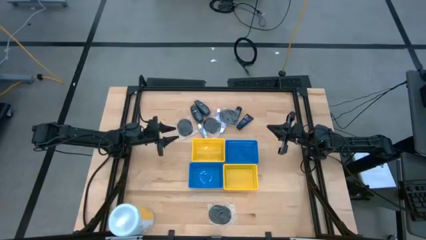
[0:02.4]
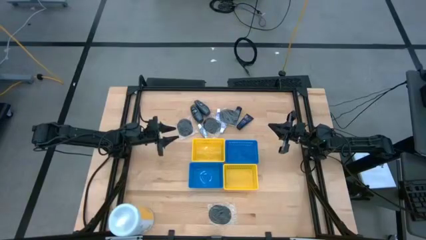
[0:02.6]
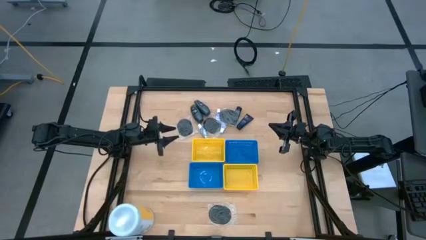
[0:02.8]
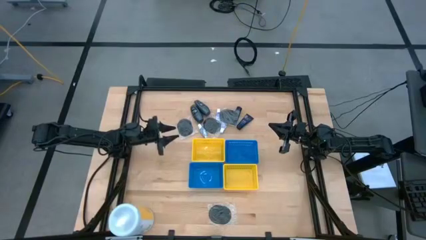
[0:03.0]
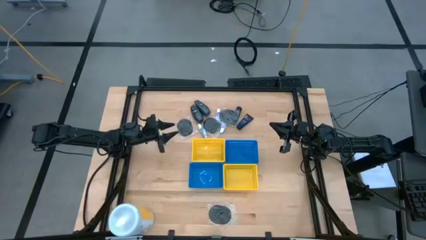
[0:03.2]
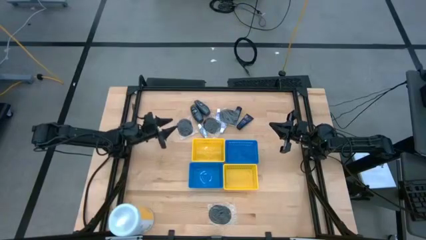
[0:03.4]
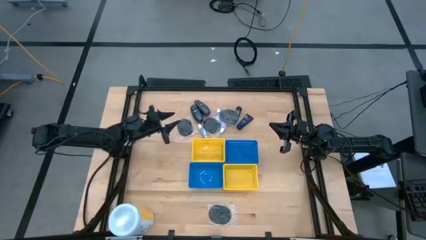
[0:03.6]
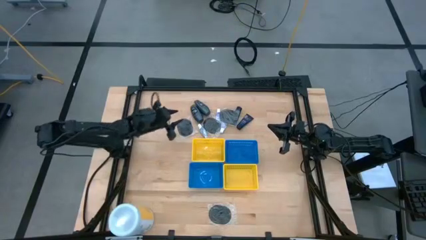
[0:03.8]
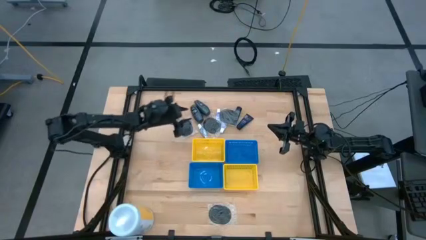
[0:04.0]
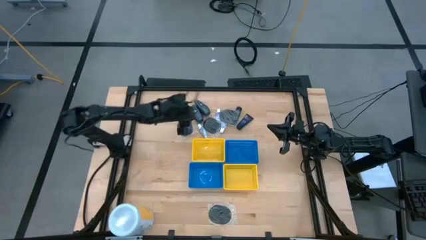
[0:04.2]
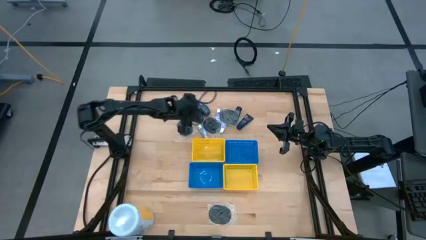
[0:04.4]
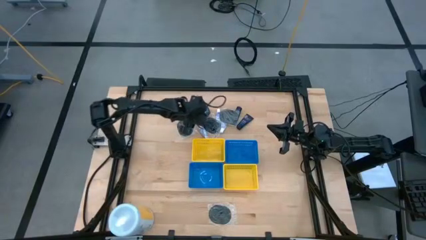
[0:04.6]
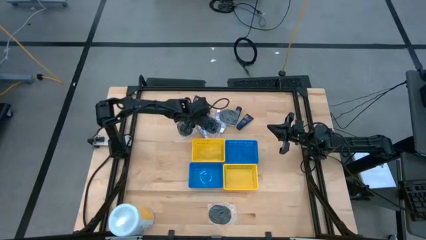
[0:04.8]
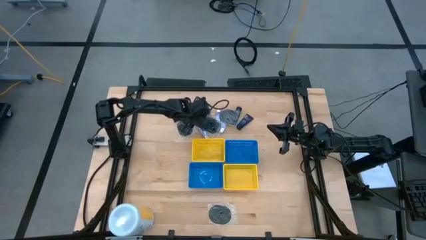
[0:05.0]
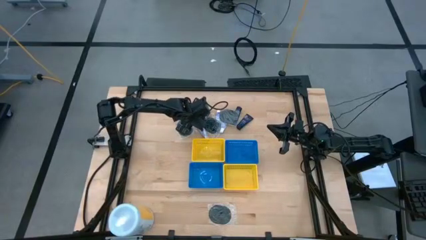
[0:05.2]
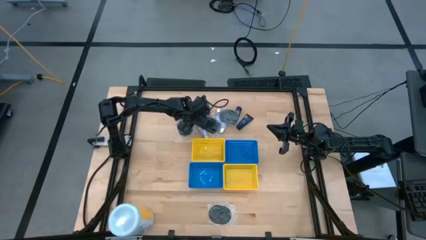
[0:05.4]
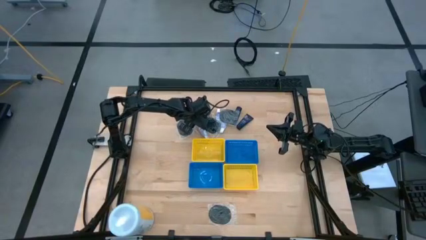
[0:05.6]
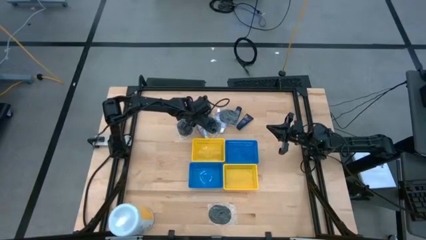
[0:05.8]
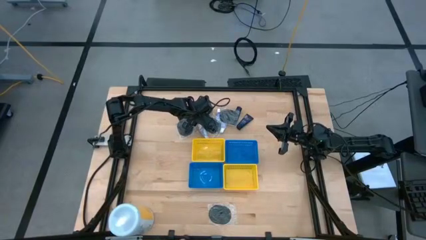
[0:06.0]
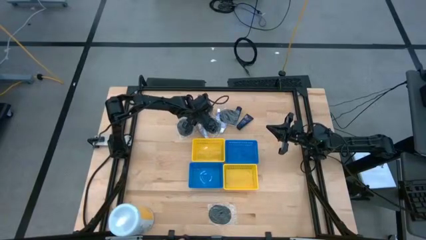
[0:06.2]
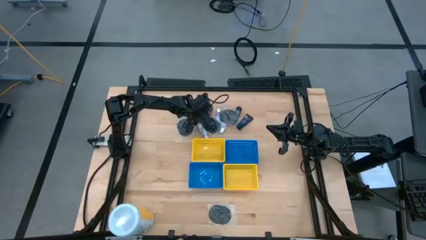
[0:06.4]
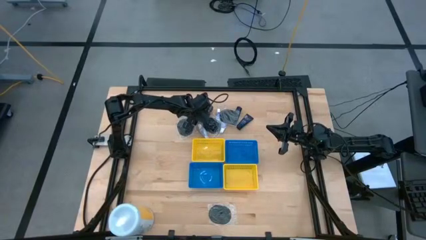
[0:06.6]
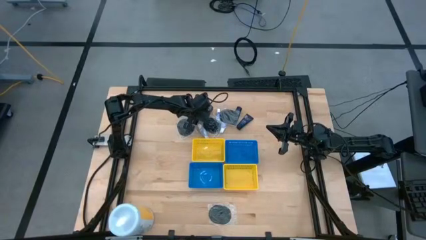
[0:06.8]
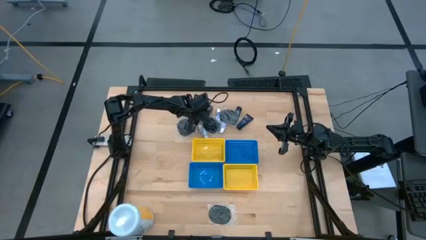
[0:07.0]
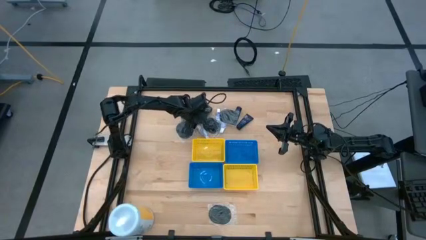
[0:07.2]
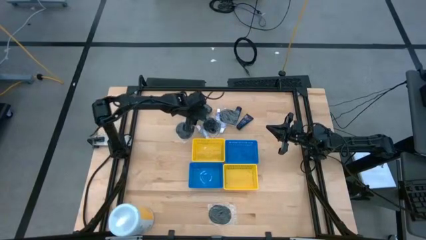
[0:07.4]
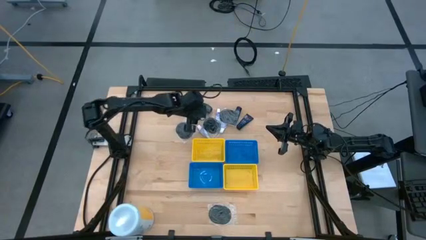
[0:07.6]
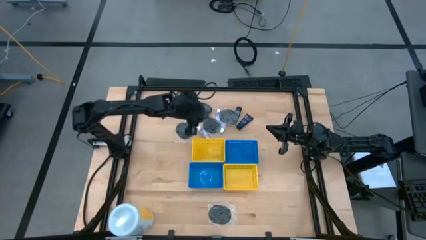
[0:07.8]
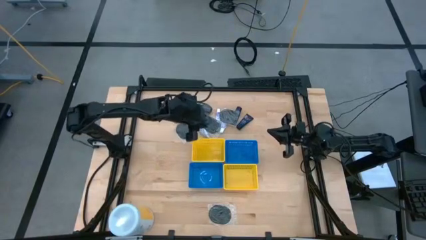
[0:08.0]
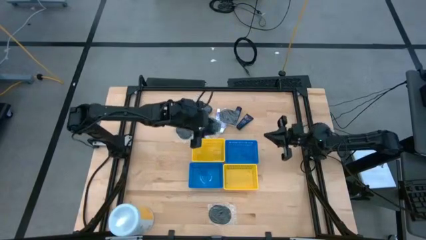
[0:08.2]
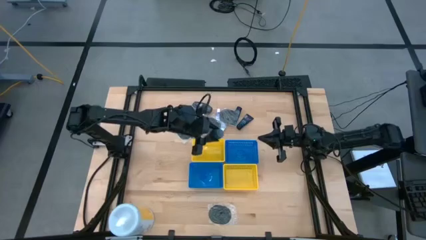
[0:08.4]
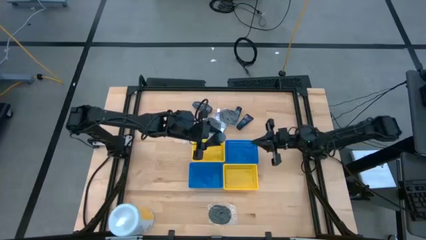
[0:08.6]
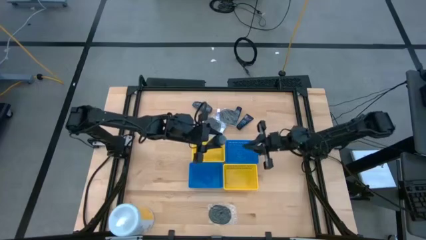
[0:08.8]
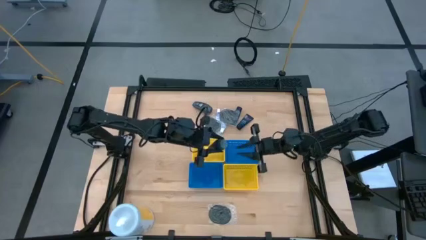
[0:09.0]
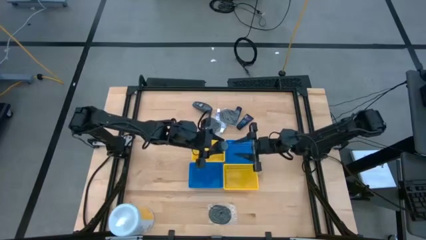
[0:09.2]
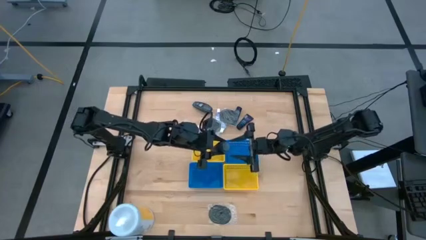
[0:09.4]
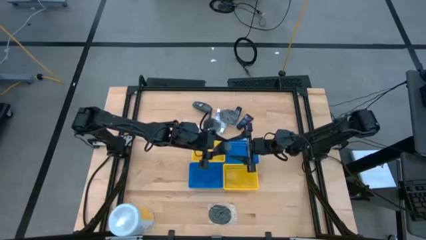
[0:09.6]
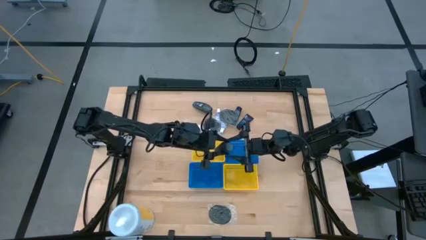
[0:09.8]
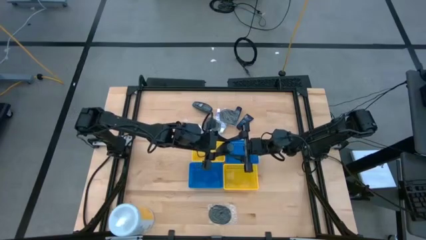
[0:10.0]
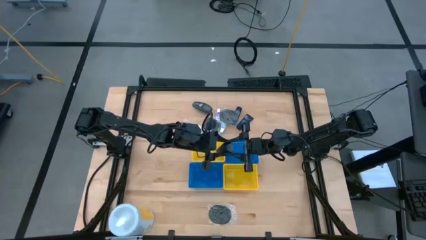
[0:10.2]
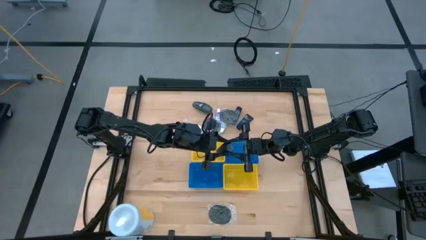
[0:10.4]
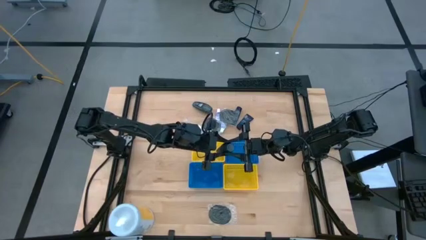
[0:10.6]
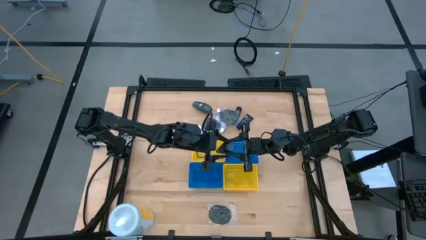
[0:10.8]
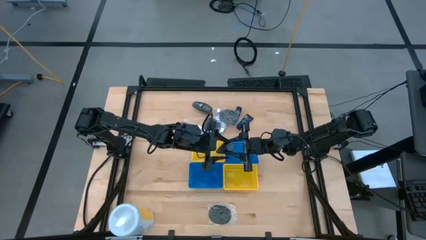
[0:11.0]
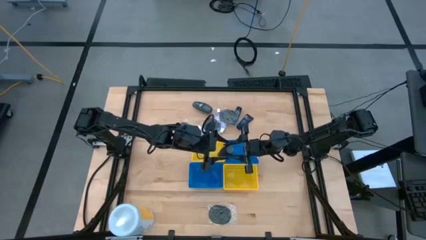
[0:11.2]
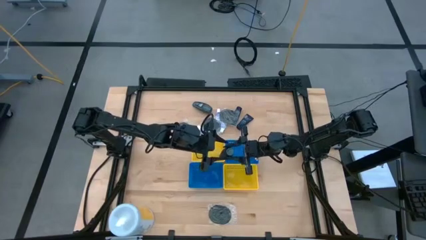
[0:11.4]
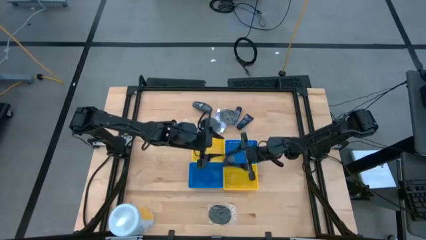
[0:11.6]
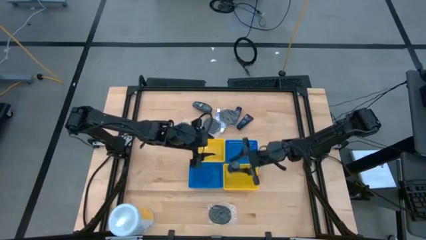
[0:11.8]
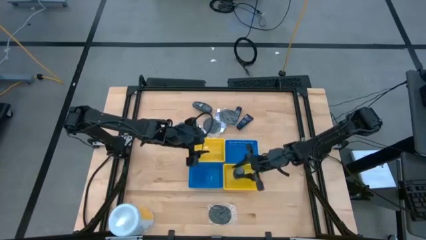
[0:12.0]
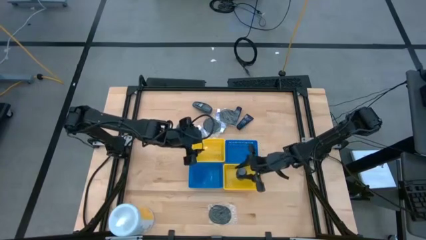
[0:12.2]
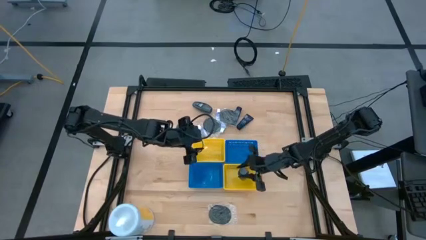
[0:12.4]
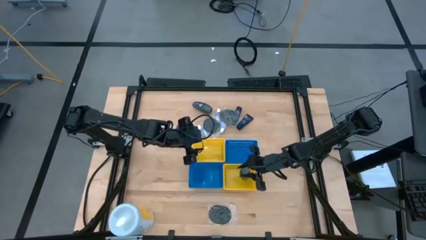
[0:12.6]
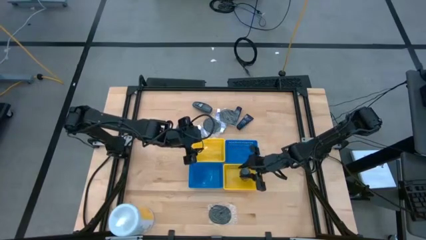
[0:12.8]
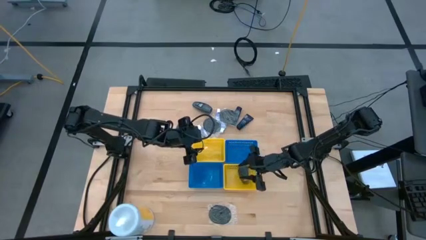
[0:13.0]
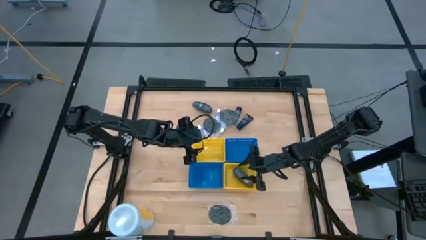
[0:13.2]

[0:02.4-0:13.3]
Task: Pick & Place Travel size toiletries
Put the bottom deodorant in the bottom yellow bin

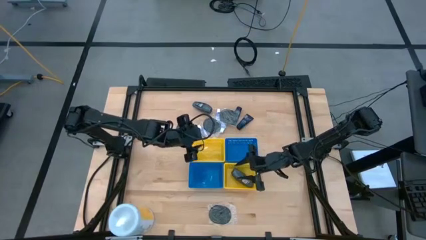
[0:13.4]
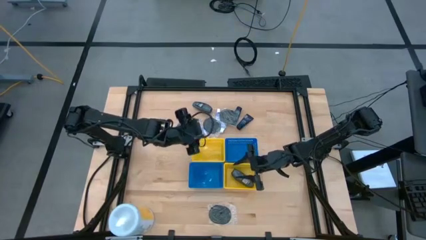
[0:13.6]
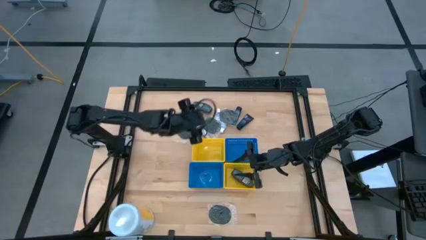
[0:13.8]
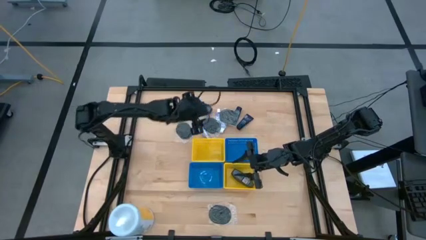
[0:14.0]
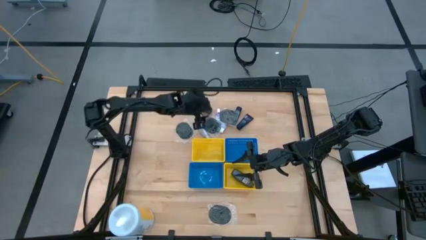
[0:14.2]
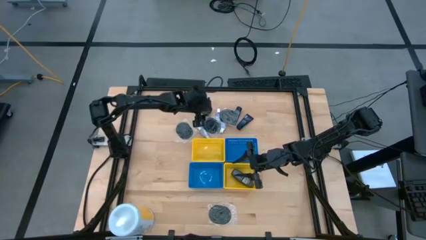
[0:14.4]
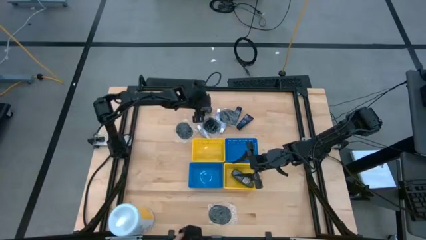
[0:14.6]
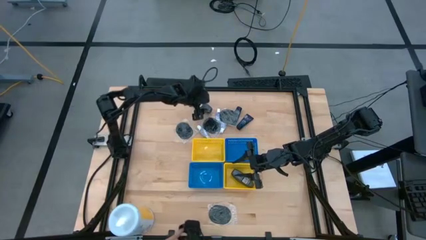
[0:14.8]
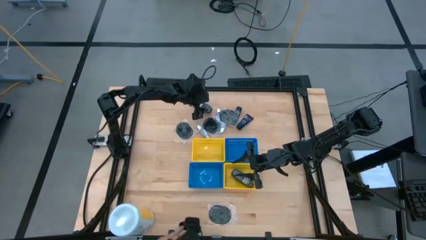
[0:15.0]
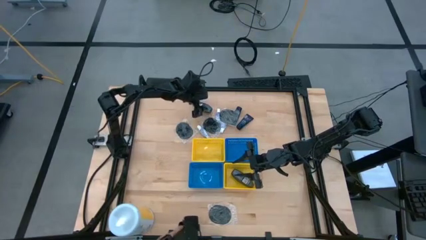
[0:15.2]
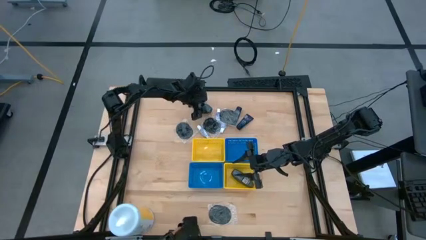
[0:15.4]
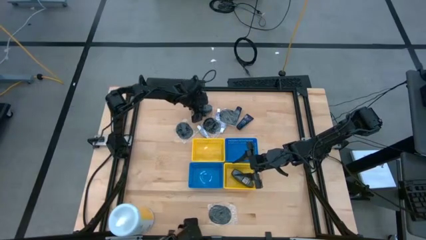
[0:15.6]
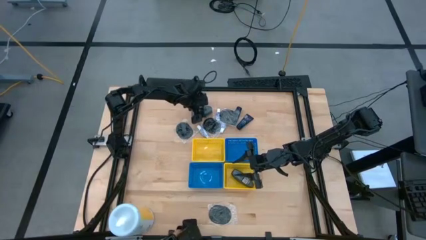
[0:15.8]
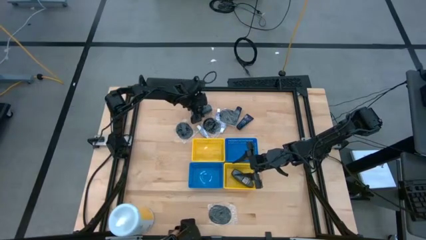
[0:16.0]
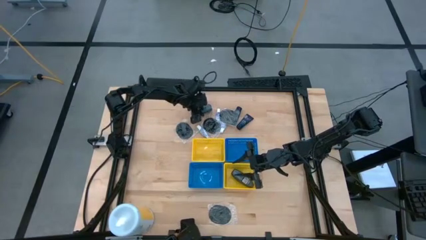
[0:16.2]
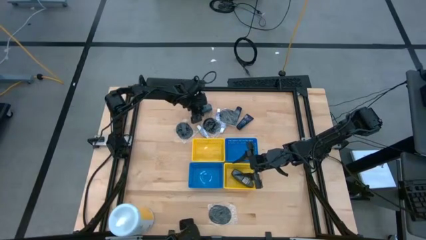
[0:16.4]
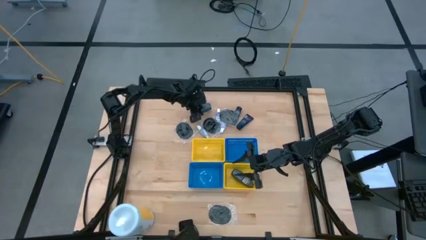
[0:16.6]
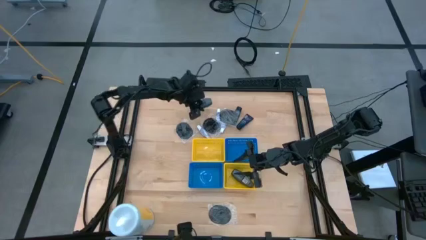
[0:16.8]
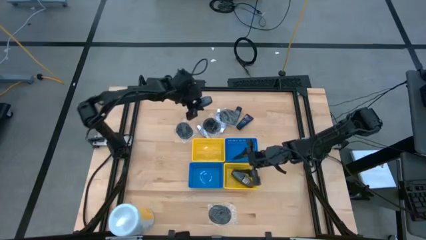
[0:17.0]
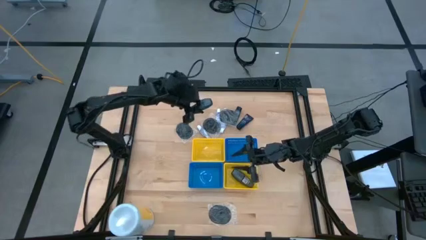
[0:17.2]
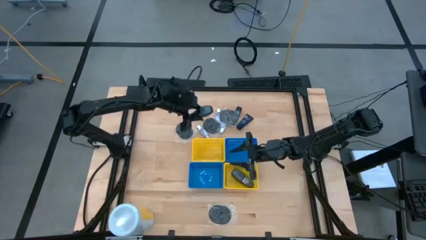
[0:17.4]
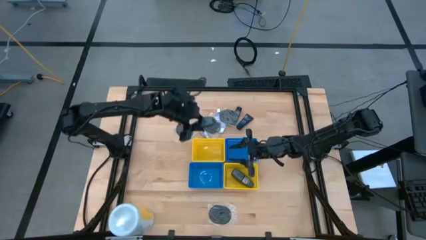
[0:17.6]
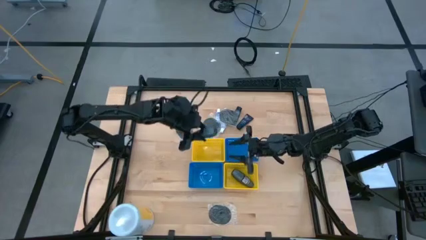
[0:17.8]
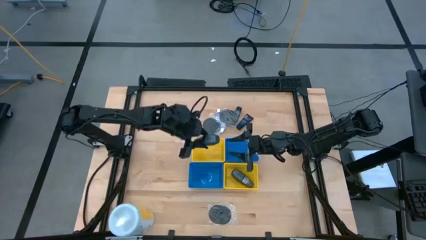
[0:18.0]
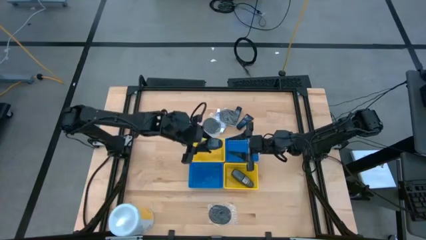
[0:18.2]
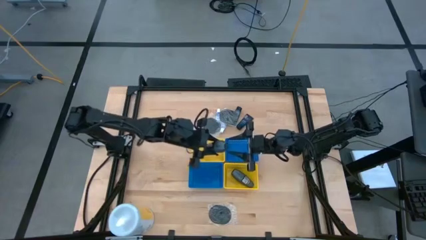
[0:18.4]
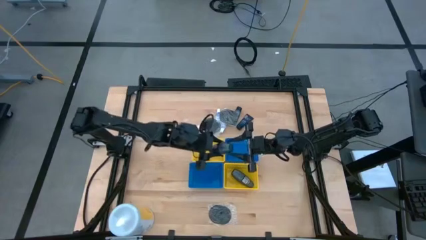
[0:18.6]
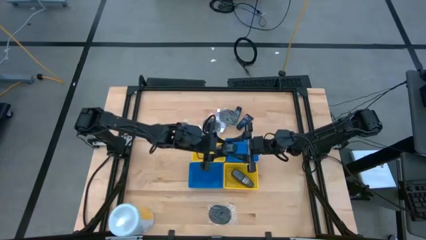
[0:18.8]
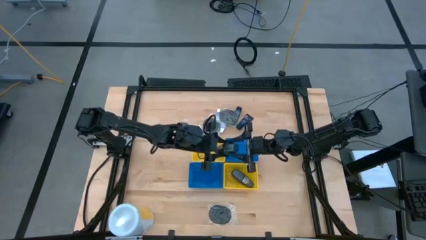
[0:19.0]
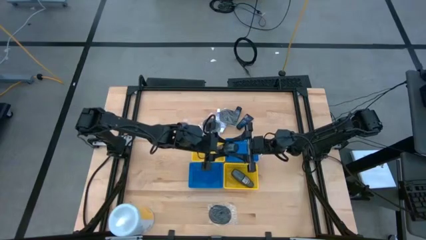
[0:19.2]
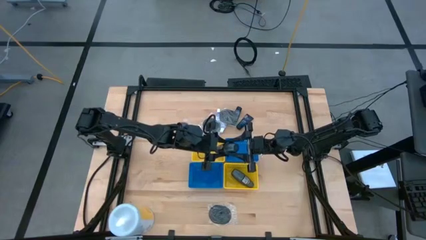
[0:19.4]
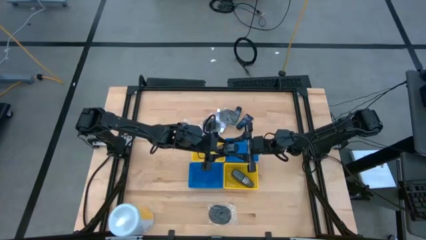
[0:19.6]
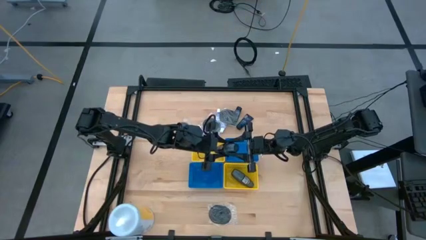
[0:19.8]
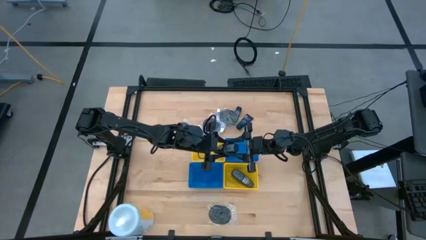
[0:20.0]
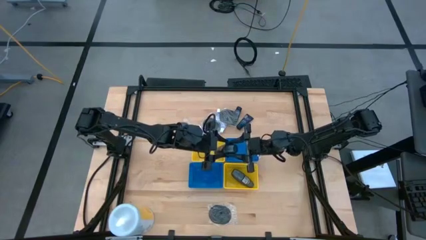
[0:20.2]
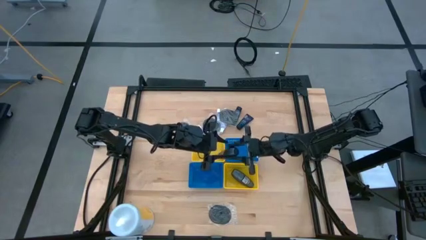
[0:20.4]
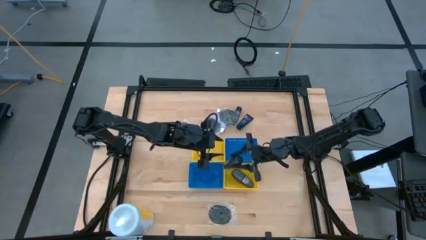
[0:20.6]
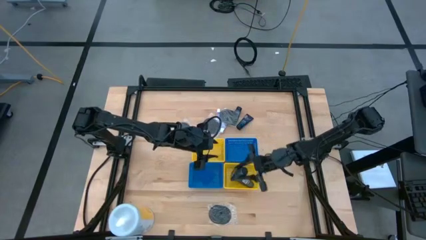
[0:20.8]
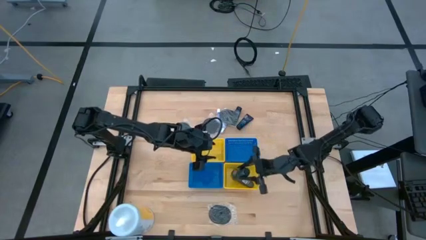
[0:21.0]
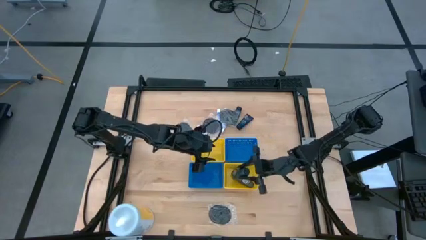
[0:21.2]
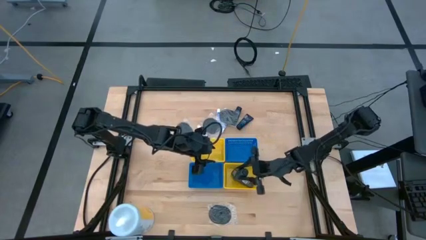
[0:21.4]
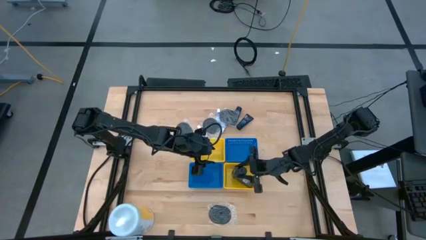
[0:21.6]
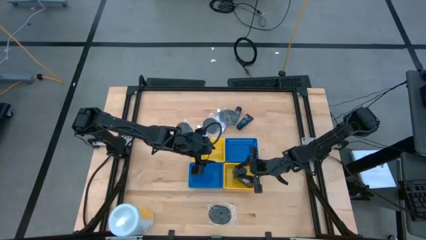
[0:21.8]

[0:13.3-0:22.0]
Put the deodorant in the bottom yellow bin
